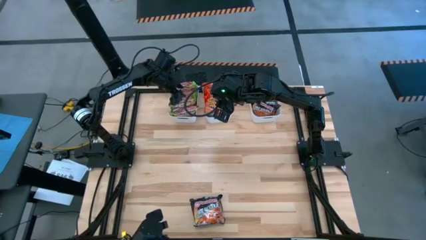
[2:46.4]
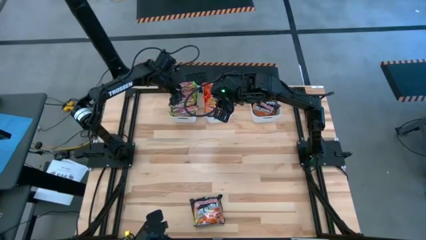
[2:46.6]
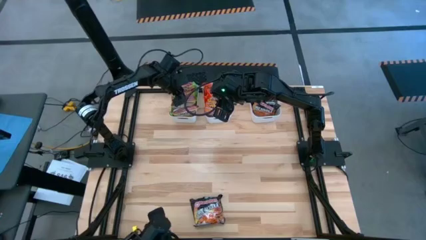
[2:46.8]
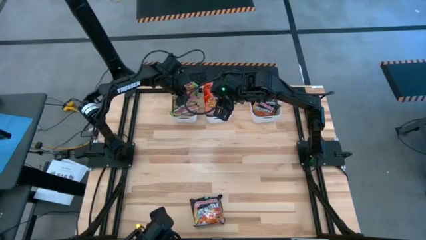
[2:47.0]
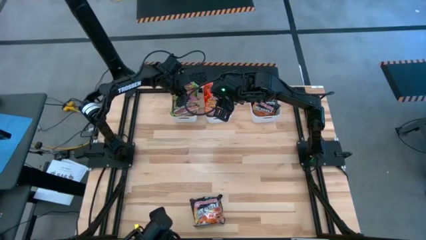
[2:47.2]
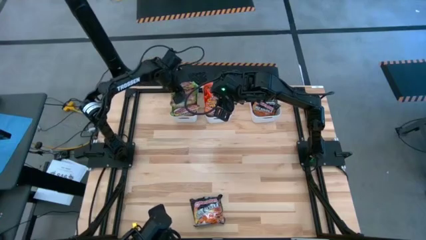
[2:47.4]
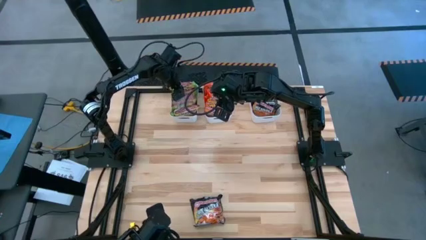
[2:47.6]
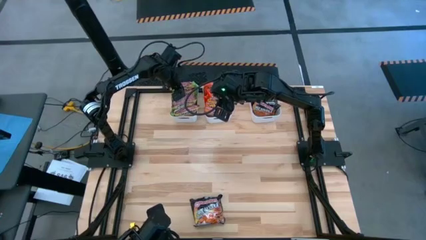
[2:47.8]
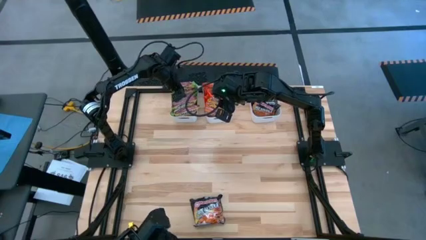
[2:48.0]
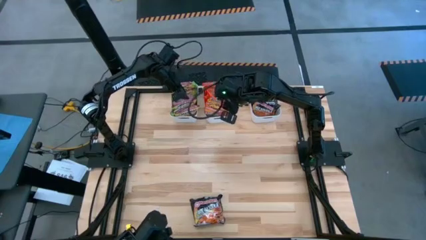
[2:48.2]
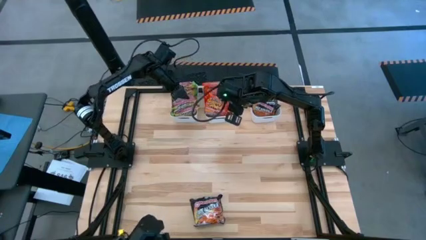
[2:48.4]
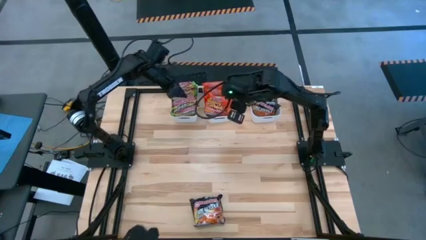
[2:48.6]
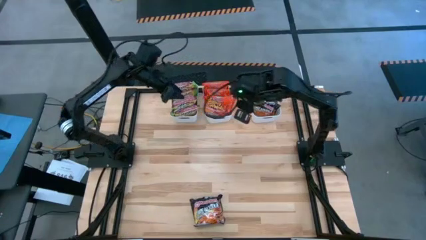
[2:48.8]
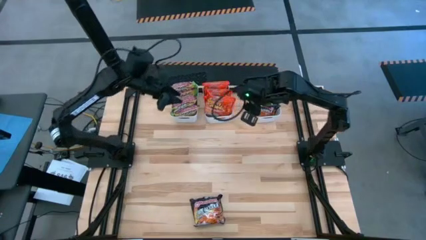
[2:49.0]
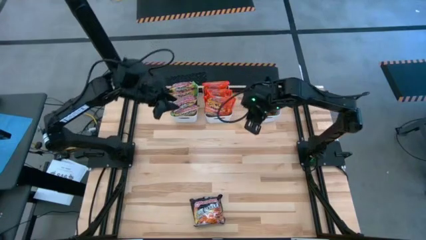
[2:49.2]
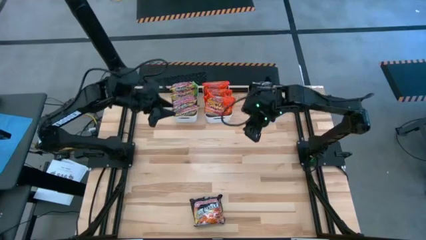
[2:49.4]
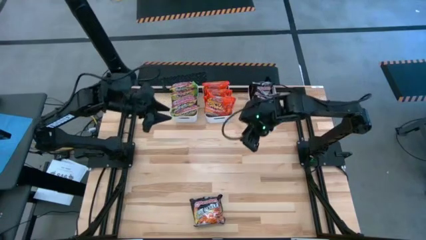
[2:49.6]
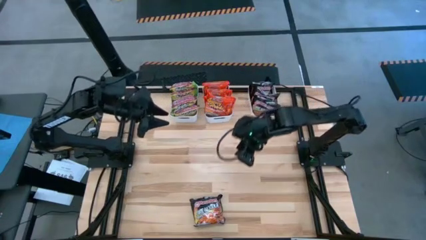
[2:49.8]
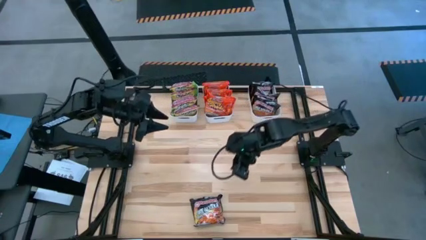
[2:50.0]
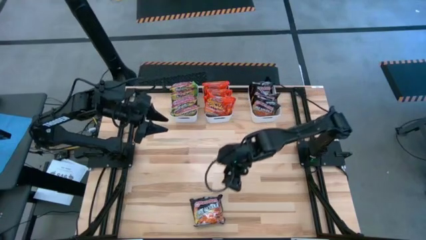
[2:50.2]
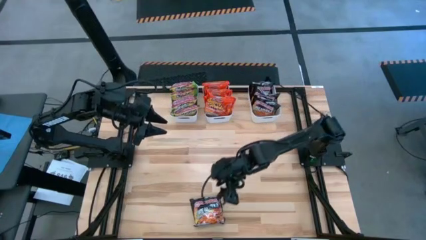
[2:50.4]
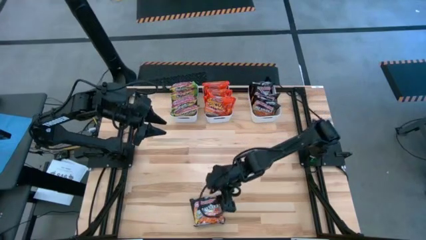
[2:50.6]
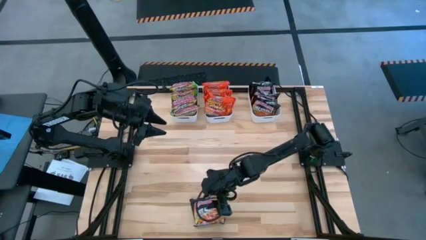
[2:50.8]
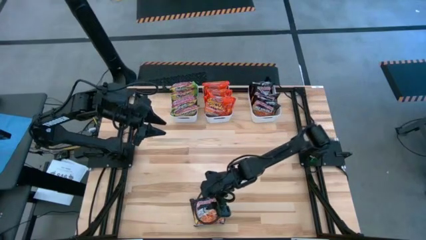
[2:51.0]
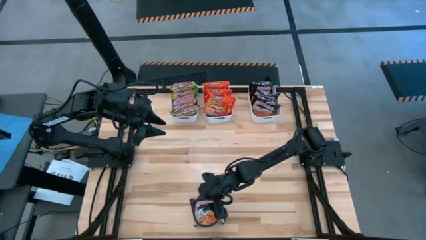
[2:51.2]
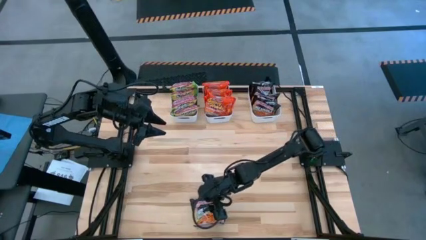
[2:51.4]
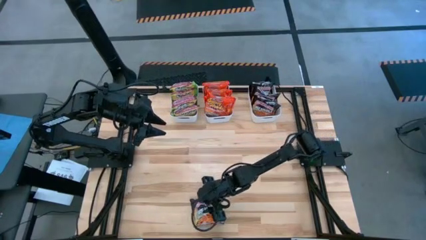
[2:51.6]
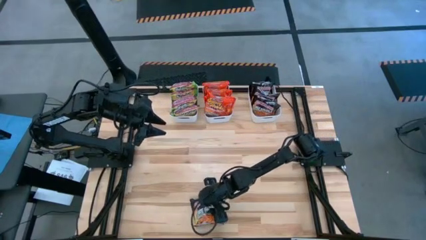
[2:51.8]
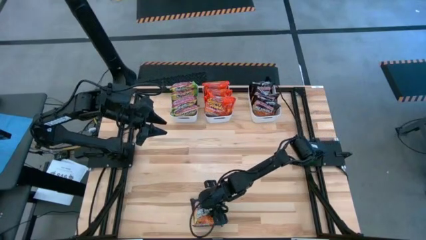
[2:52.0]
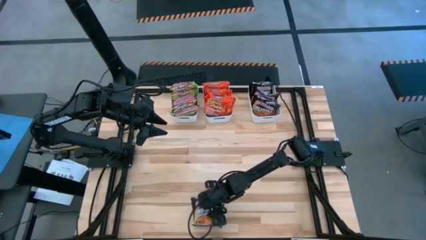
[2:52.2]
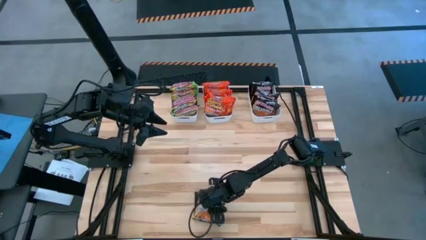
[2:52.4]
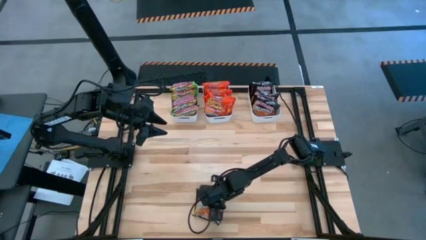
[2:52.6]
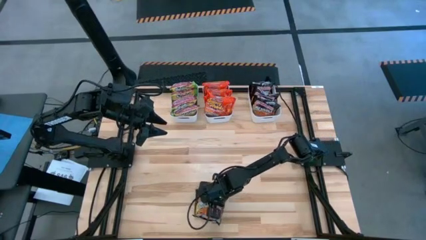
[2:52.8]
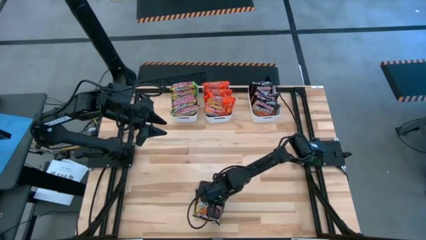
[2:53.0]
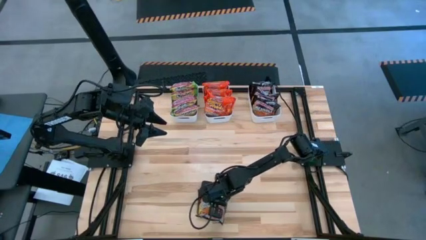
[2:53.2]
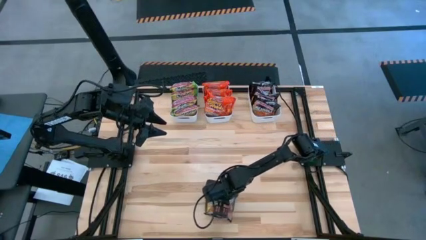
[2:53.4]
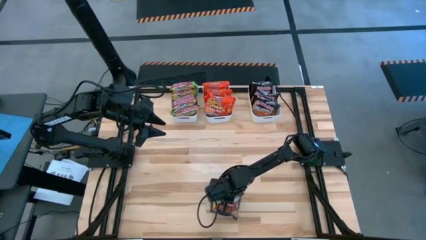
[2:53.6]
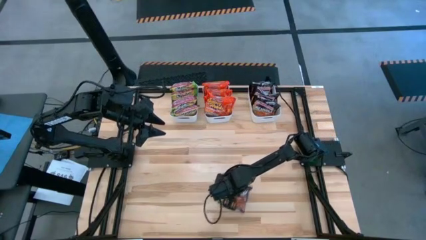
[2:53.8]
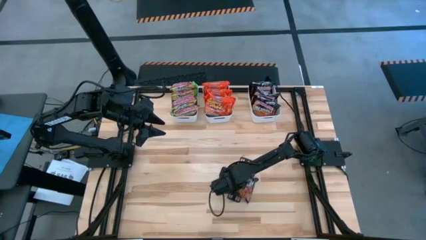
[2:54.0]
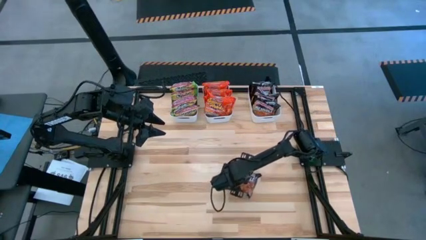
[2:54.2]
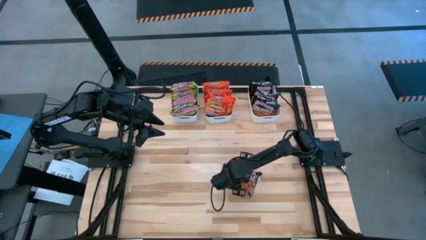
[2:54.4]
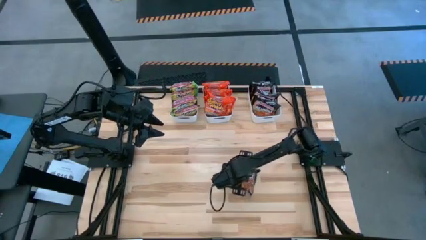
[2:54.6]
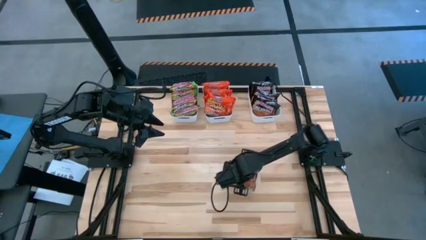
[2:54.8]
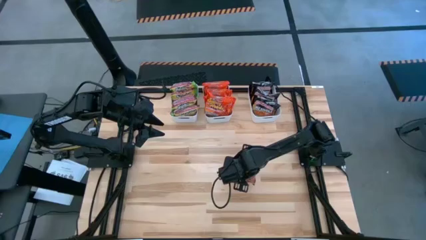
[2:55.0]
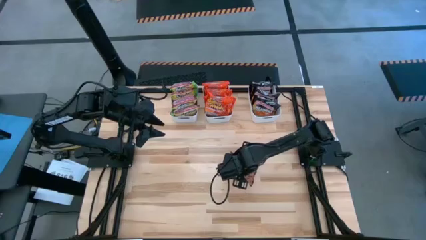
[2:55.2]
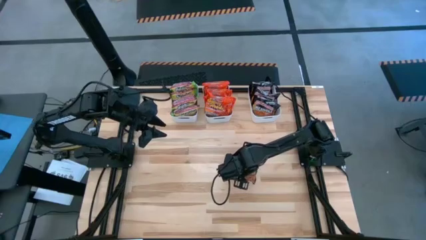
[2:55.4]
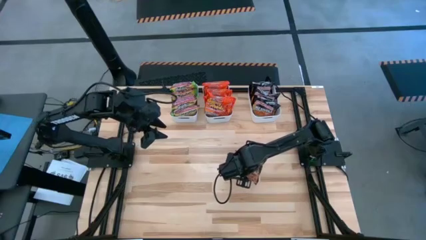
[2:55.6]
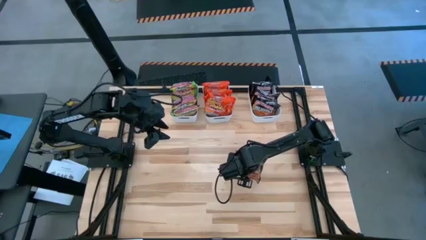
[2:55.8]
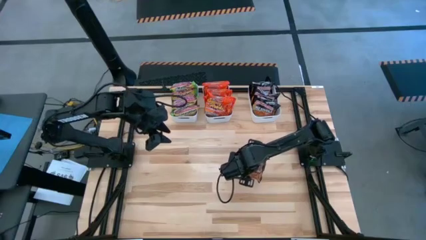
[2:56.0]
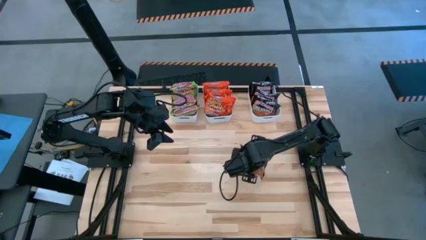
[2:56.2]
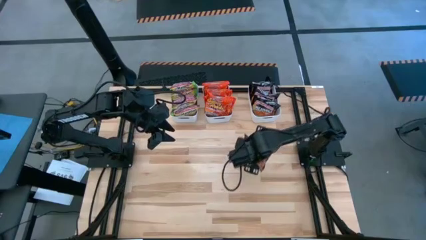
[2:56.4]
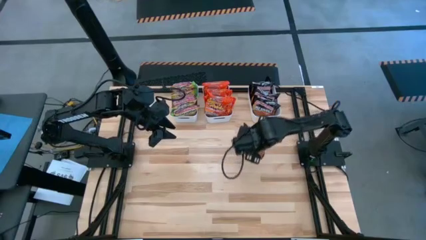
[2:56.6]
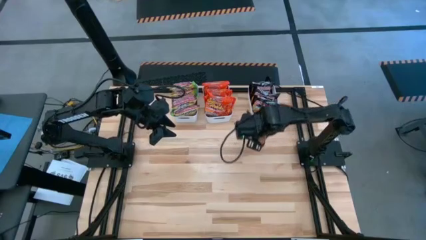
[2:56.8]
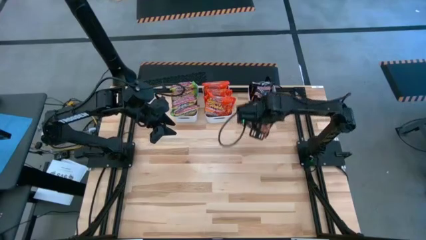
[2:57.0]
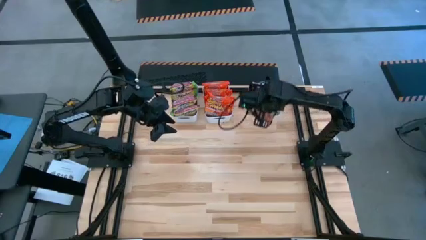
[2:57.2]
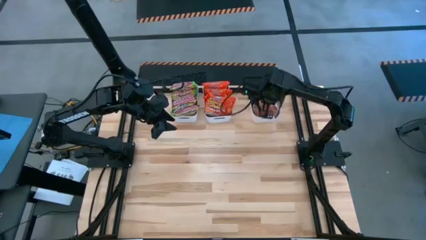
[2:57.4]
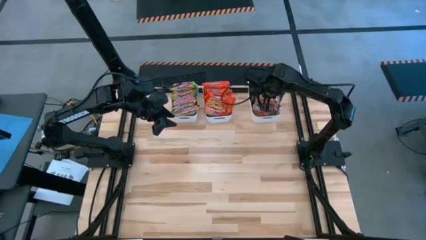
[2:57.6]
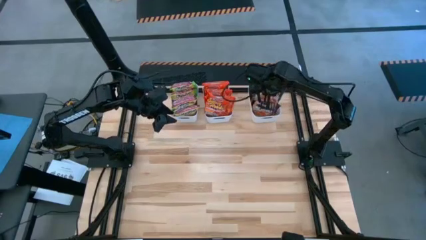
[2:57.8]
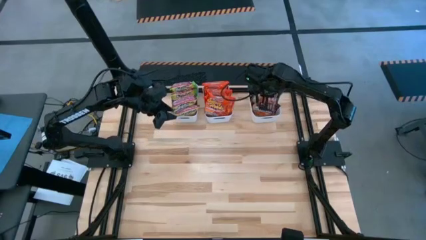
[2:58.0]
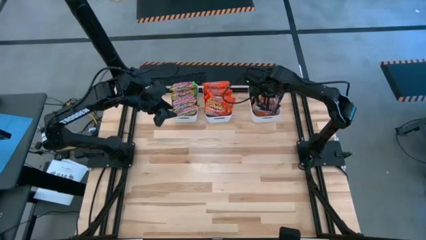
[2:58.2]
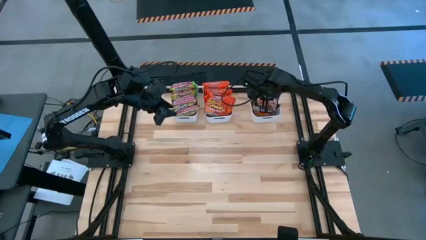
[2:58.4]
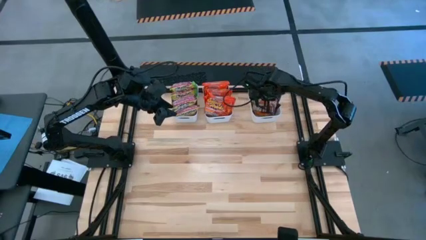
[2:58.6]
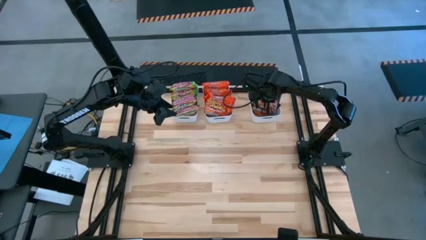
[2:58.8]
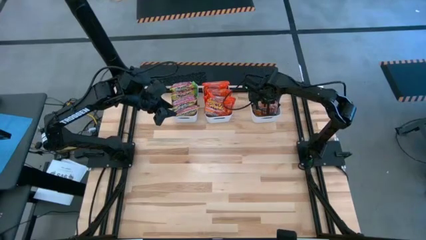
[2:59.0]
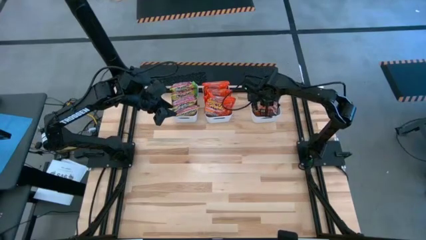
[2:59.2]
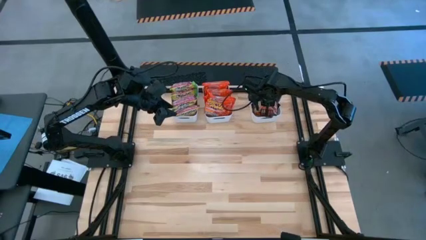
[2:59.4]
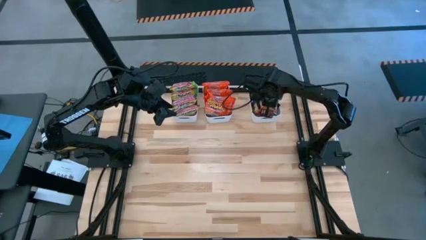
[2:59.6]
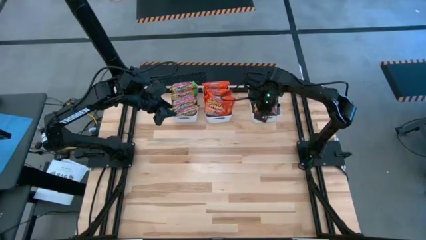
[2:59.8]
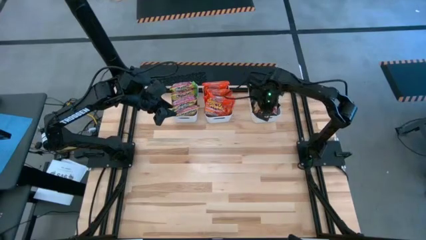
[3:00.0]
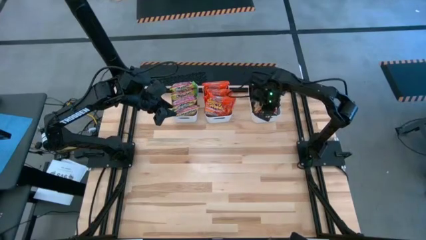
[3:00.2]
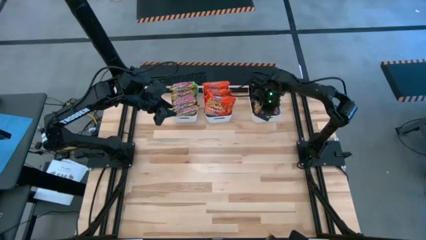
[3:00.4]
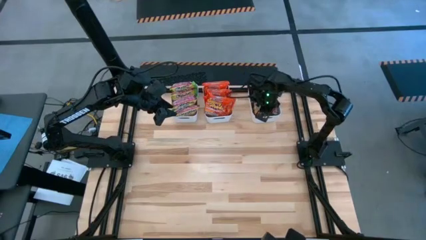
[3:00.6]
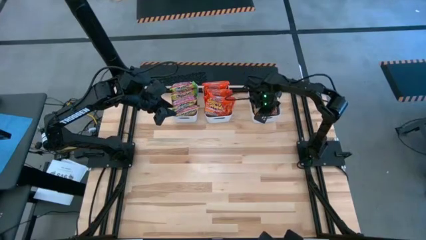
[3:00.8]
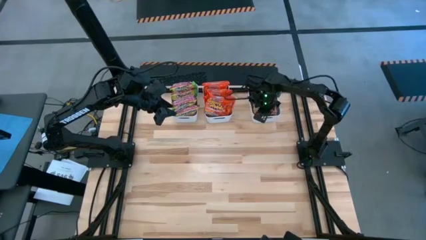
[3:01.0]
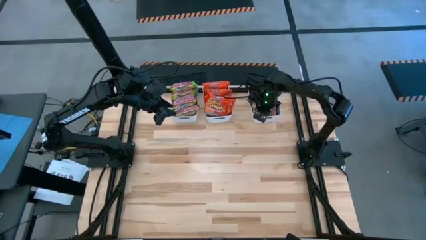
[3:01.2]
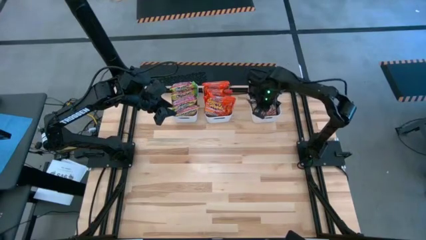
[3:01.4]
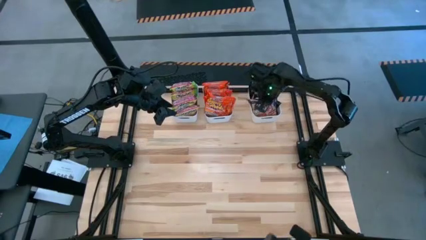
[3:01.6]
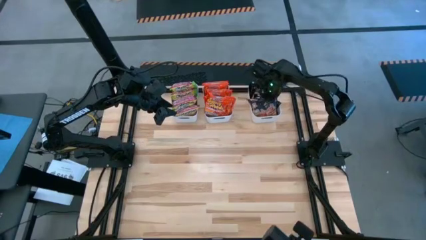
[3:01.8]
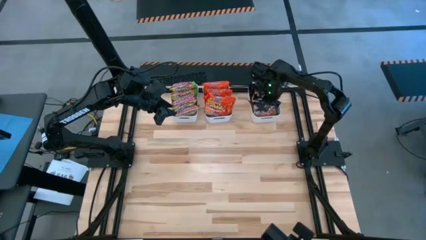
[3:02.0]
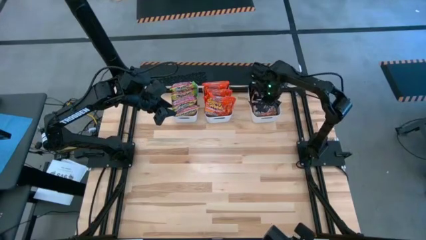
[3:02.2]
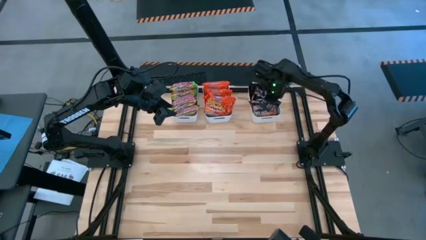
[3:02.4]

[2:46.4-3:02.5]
Task: Sort Maruchan noodles
Put the black noodle pack into the right white bin
